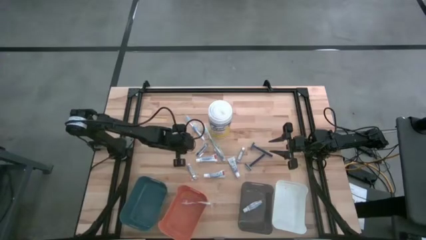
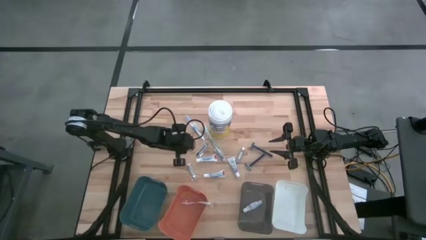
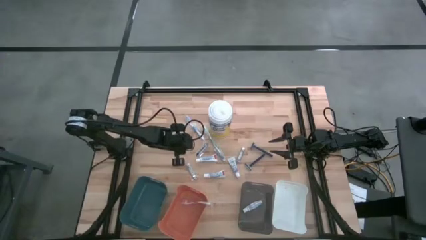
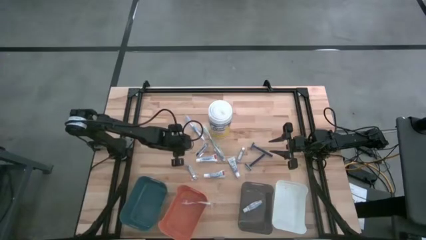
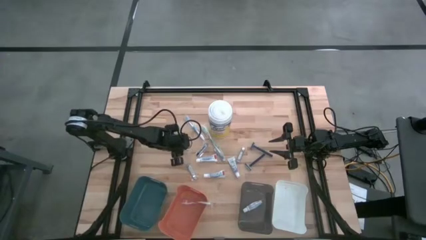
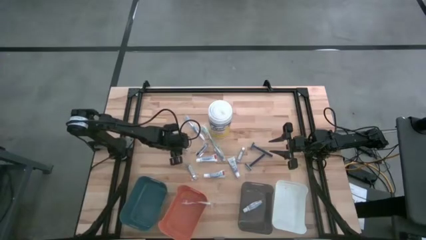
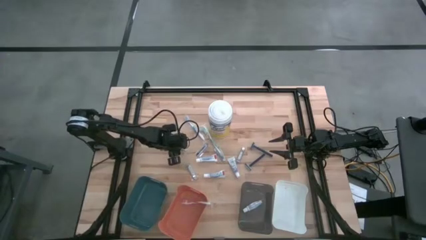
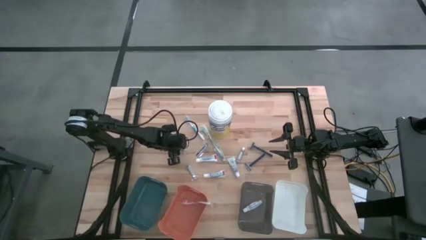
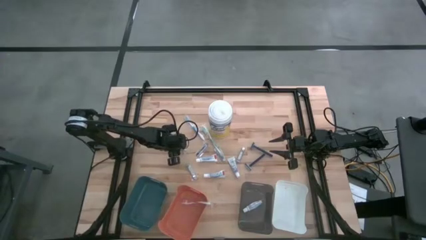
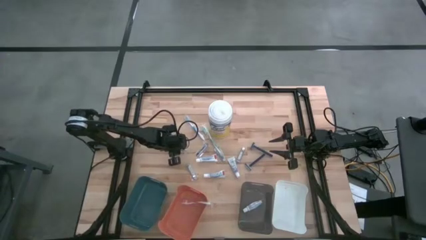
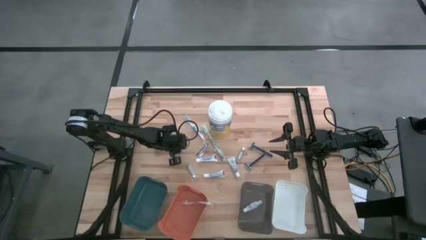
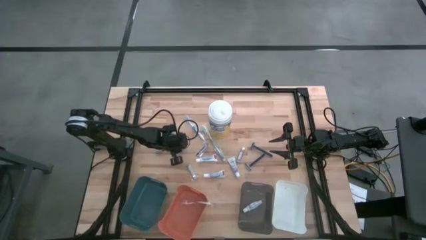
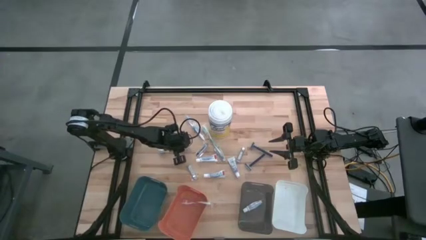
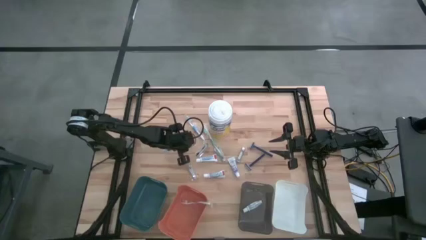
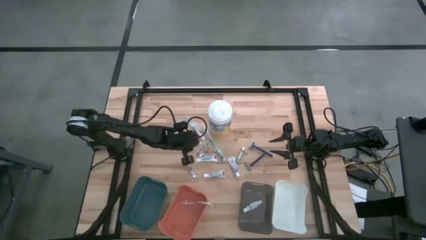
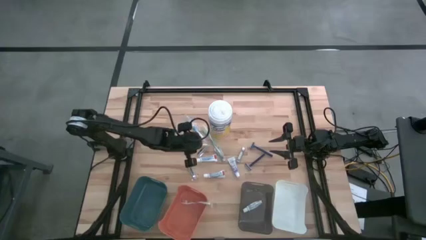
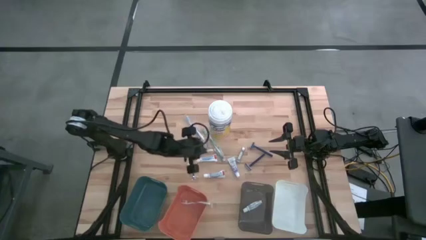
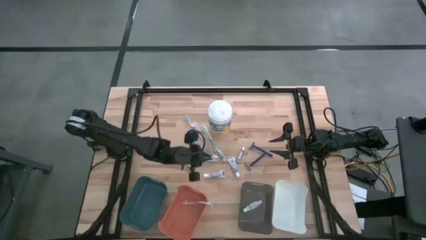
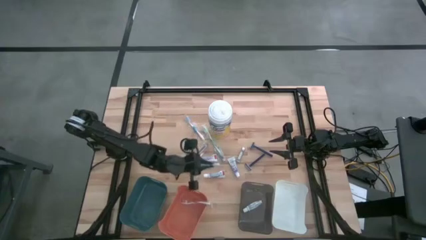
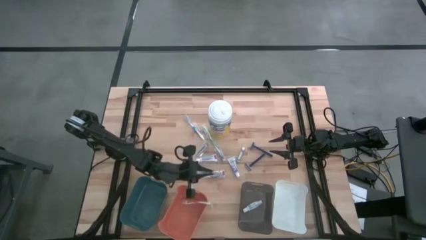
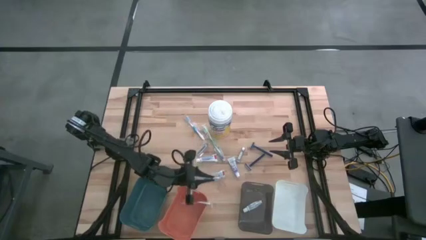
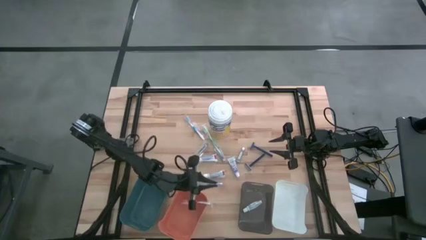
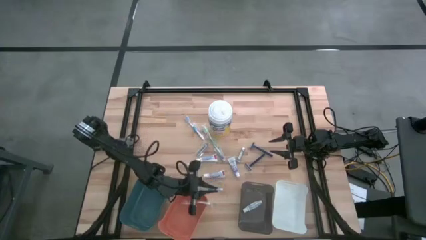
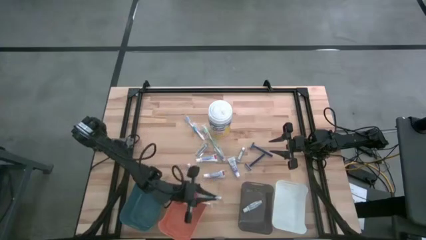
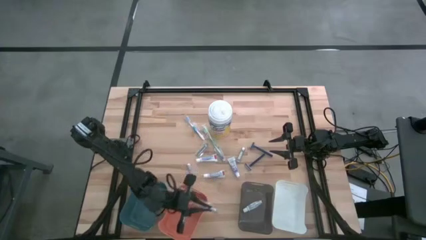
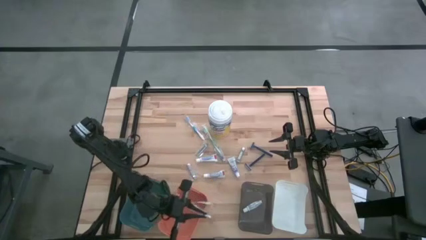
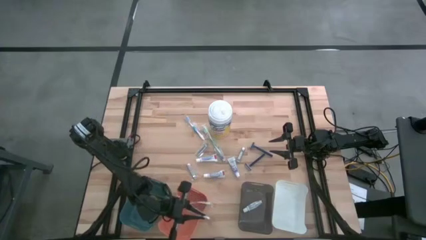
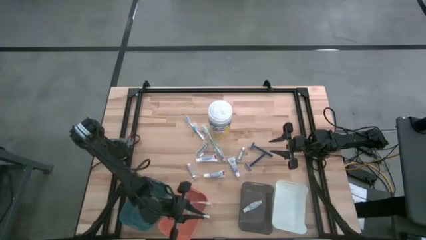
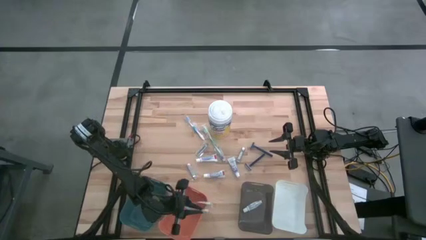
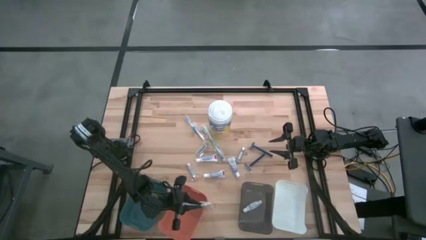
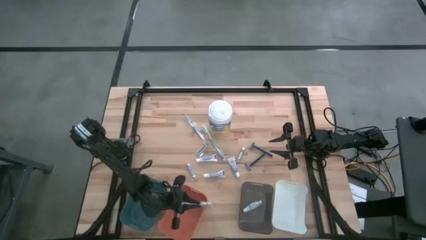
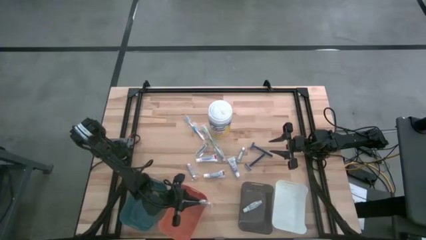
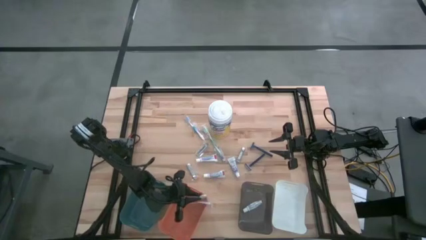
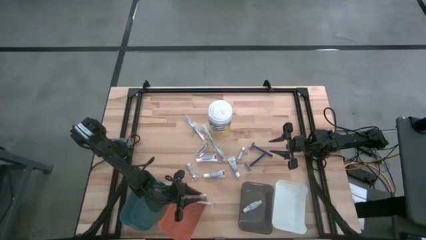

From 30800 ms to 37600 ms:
Task: Pick & Place Travel size toiletries
Put the blue toothbrush into the orange bin

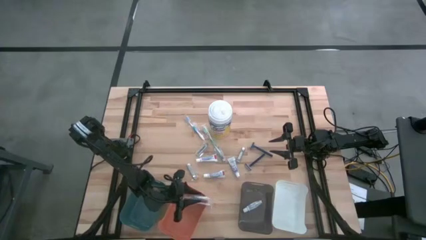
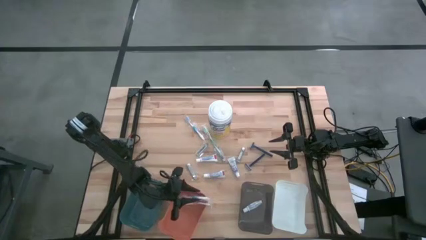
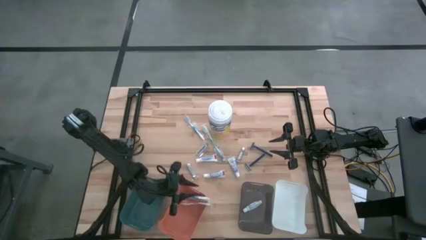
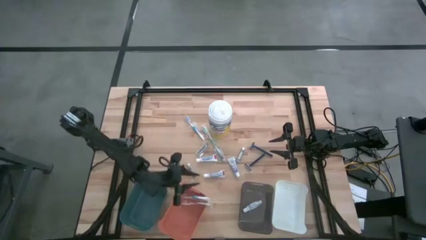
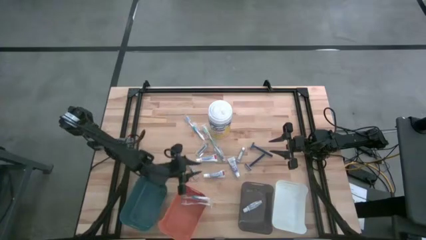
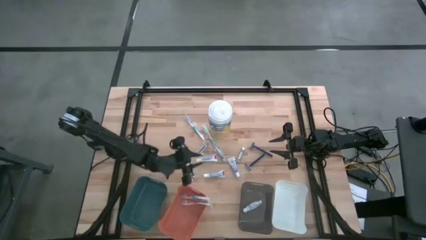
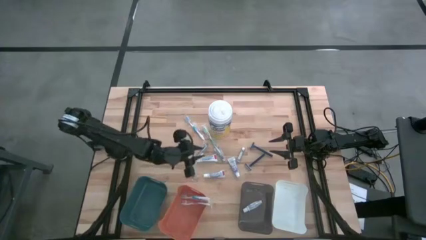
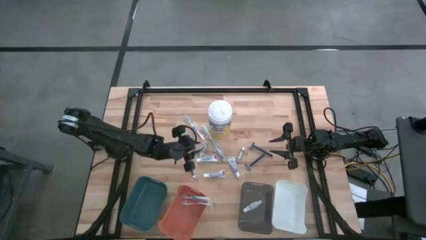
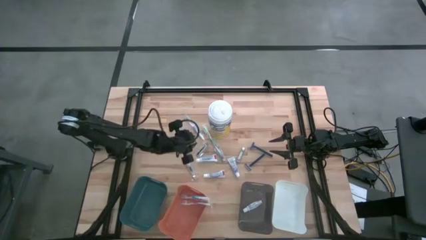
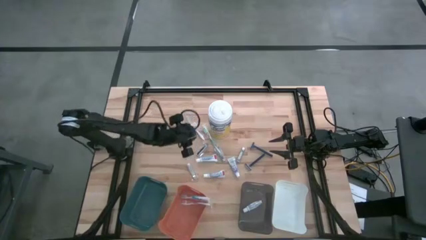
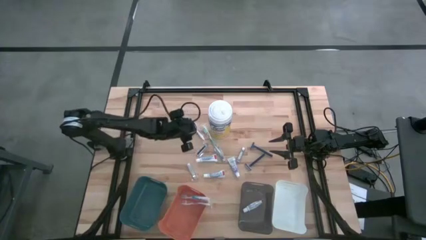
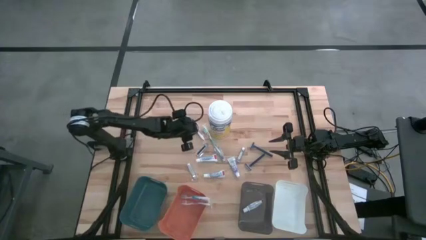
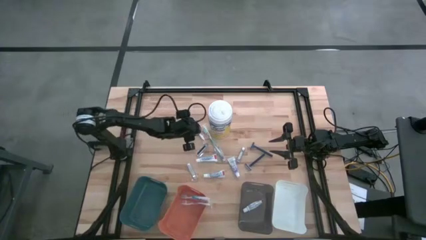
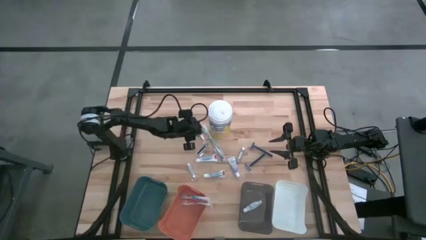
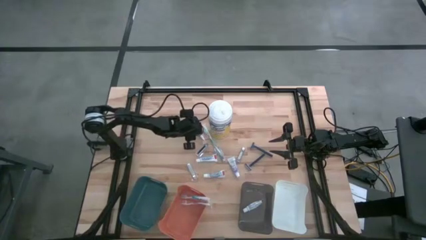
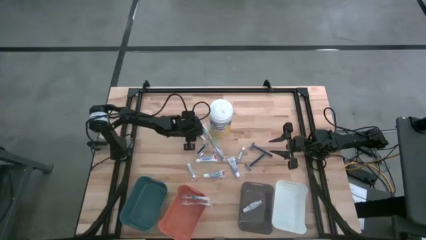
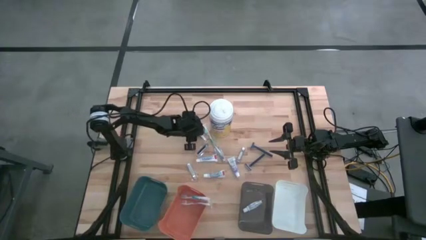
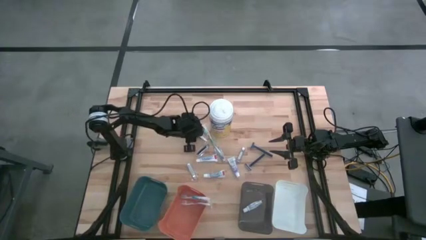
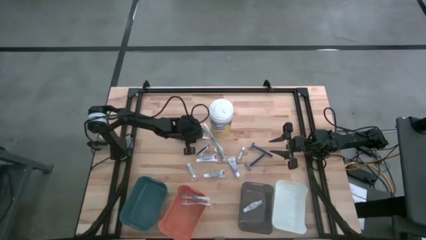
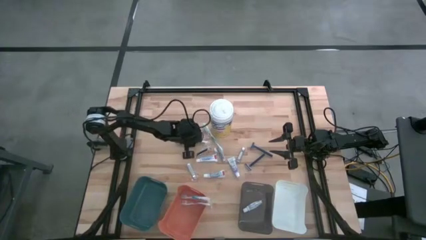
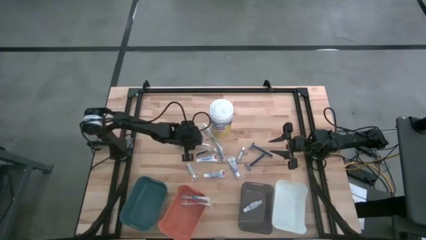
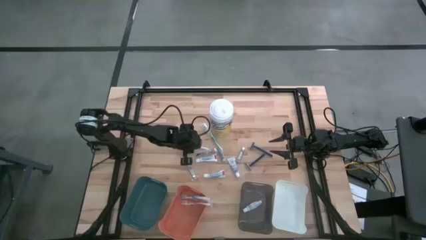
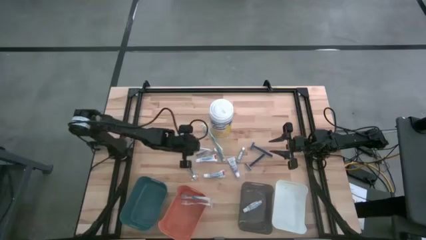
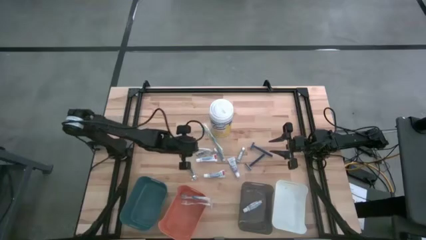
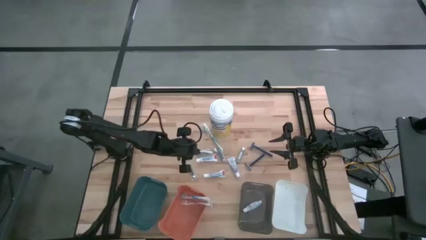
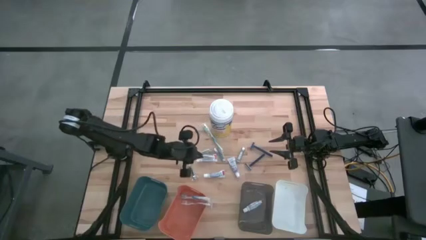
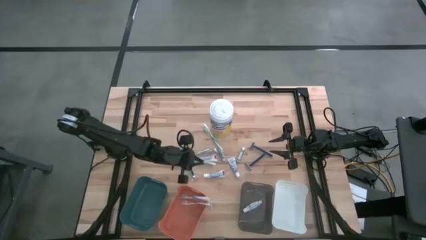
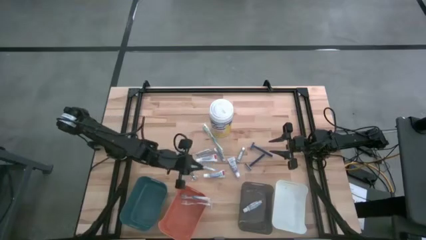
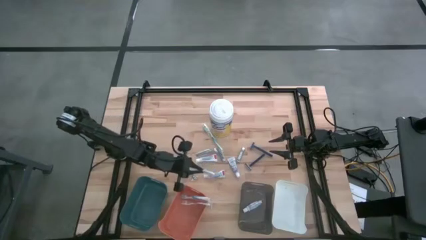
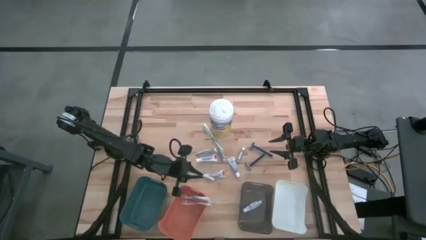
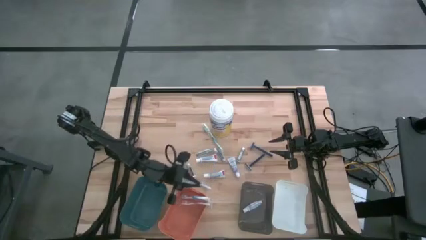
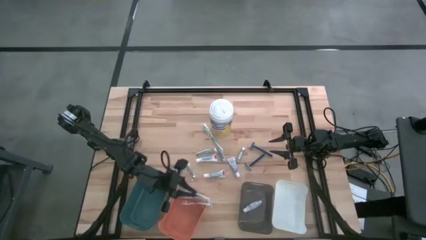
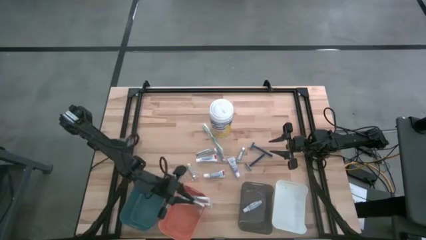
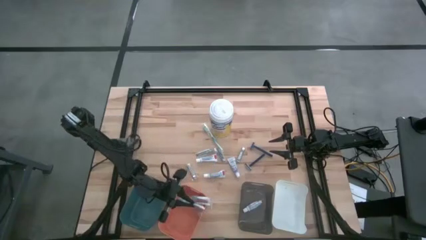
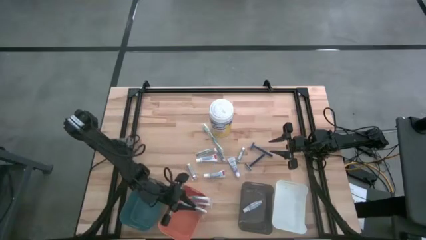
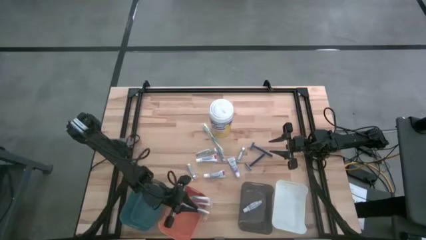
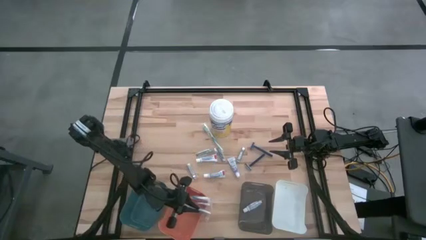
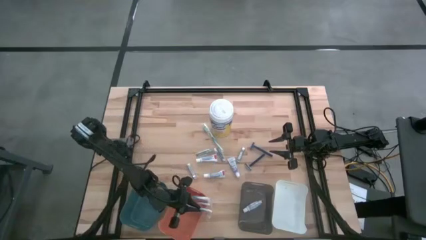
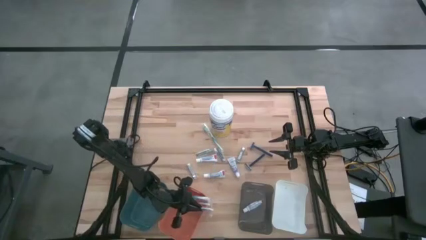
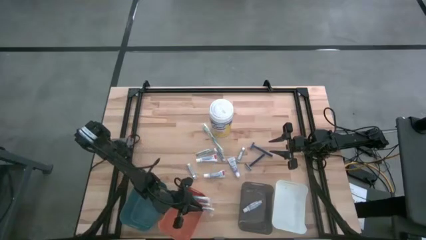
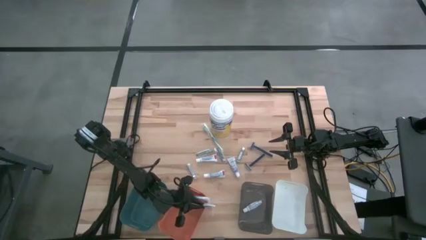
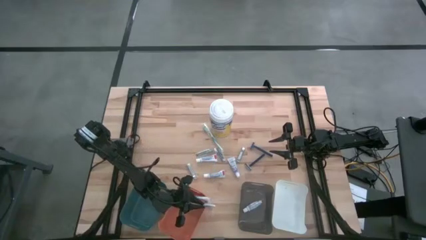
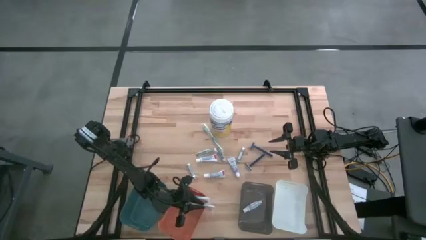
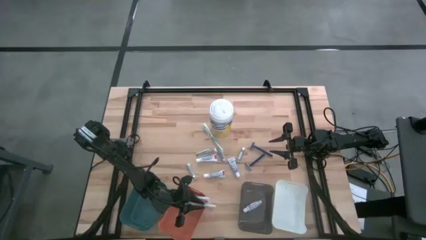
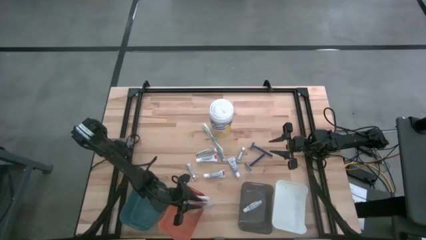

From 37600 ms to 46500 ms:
Put the blue toothbrush into the orange bin
